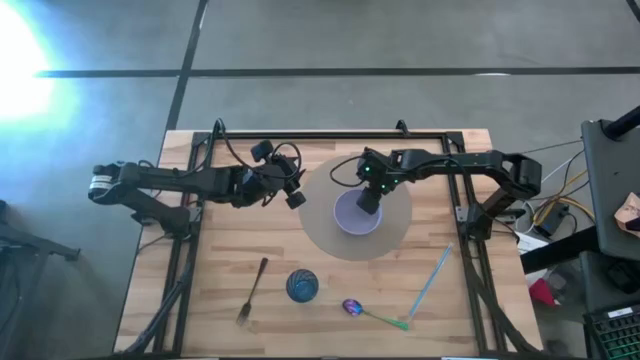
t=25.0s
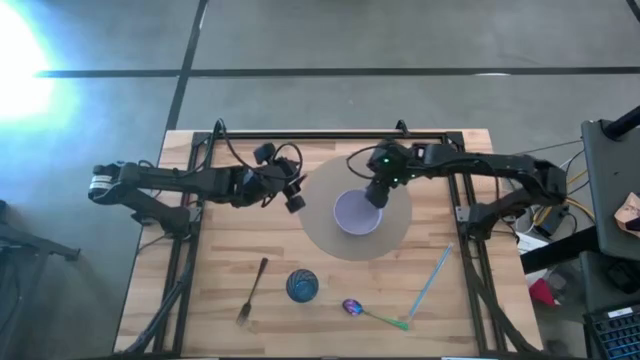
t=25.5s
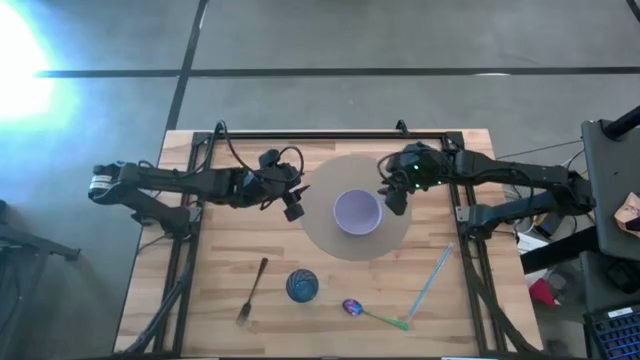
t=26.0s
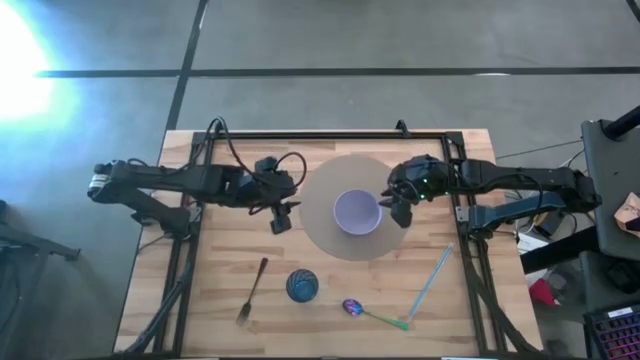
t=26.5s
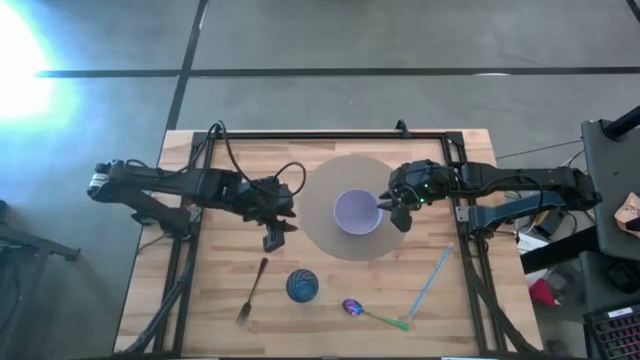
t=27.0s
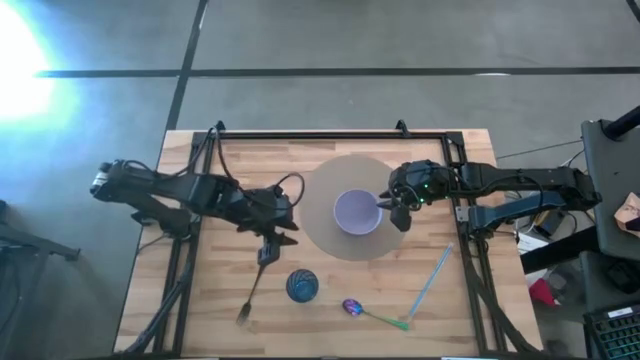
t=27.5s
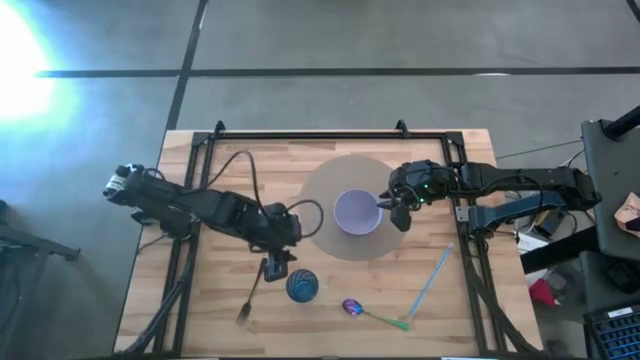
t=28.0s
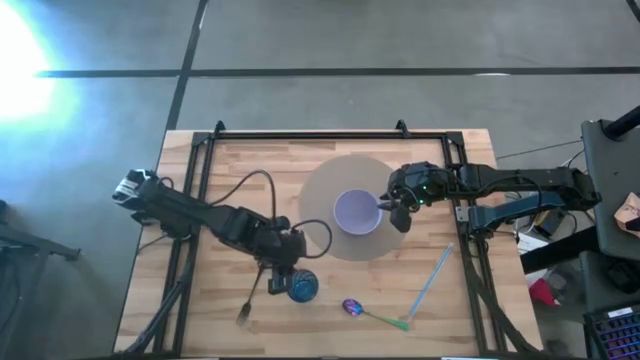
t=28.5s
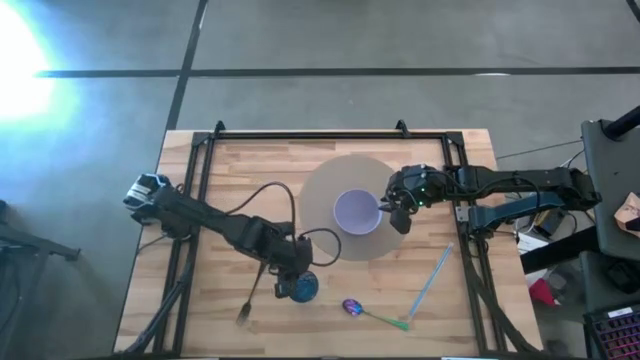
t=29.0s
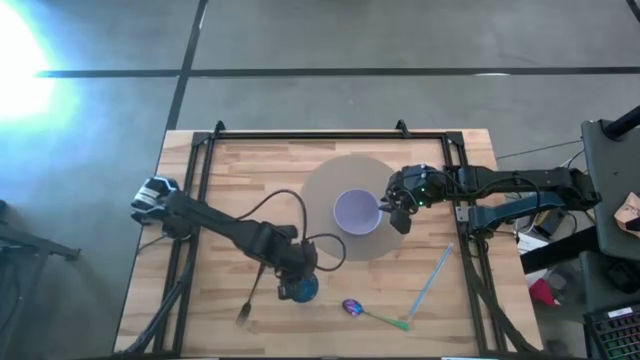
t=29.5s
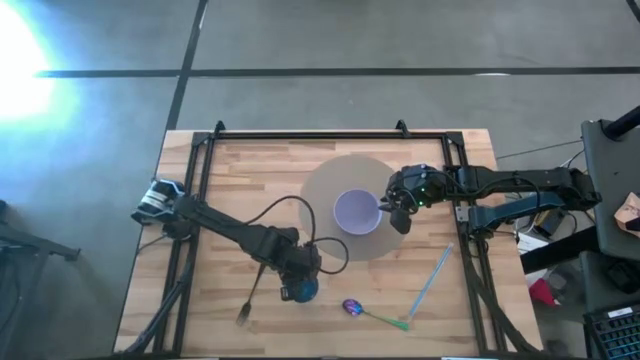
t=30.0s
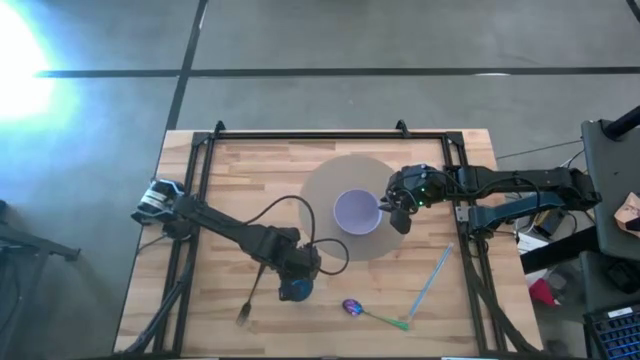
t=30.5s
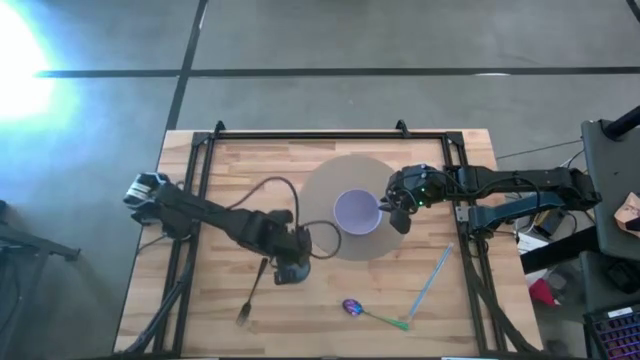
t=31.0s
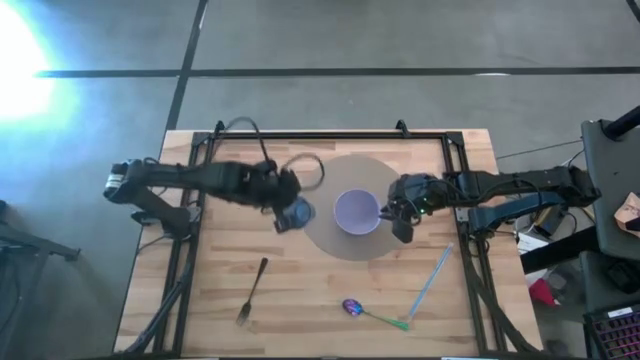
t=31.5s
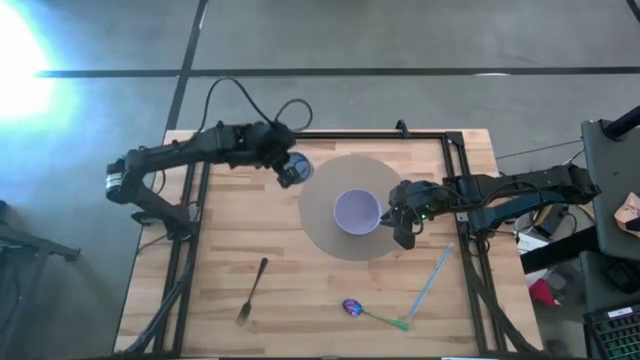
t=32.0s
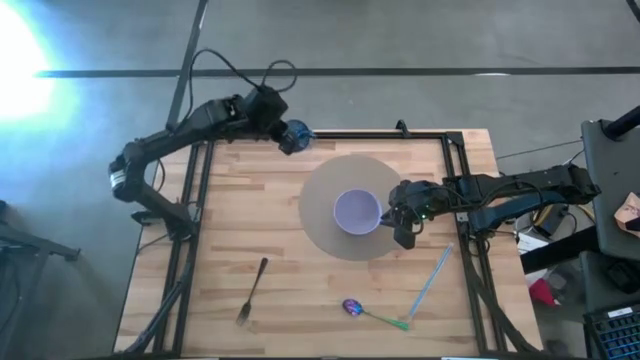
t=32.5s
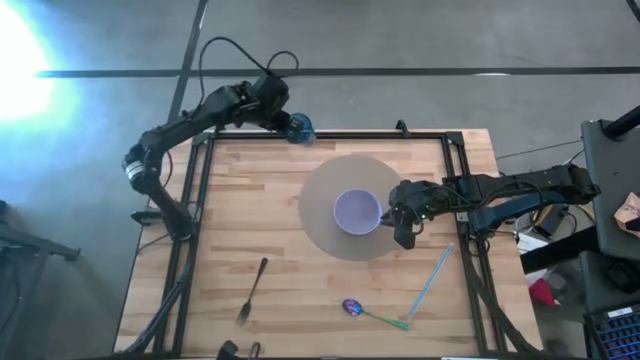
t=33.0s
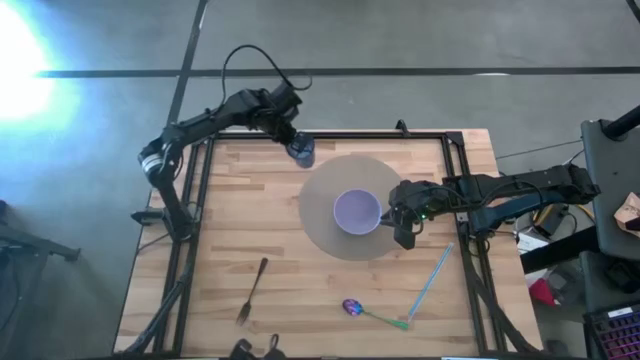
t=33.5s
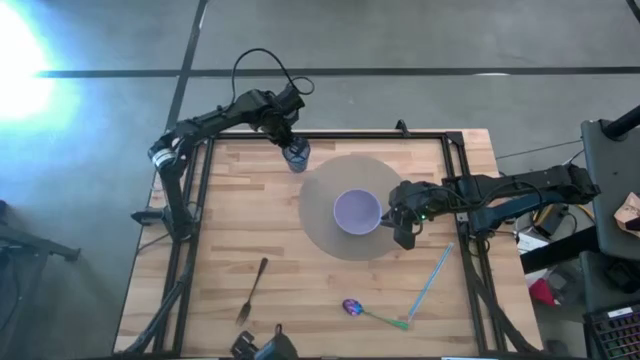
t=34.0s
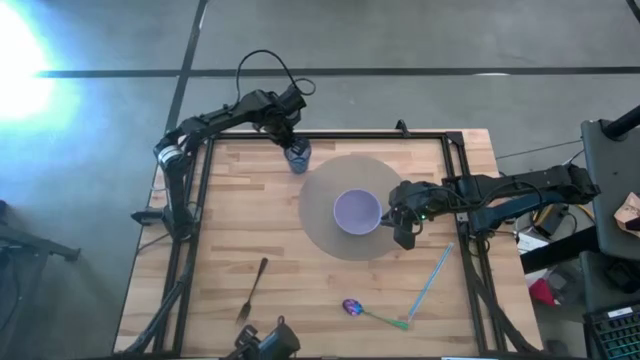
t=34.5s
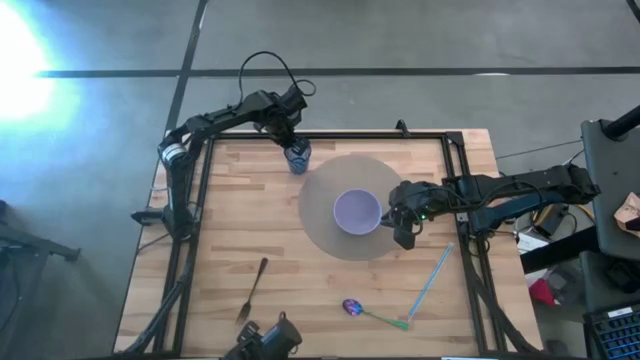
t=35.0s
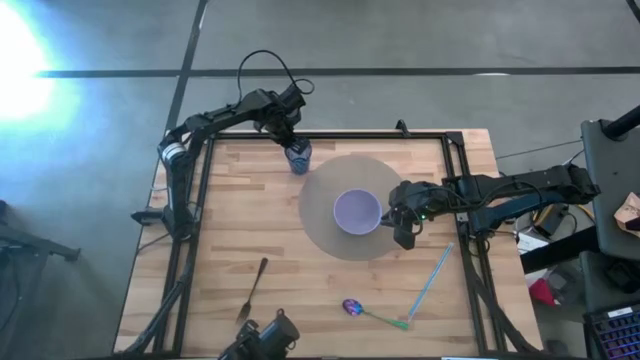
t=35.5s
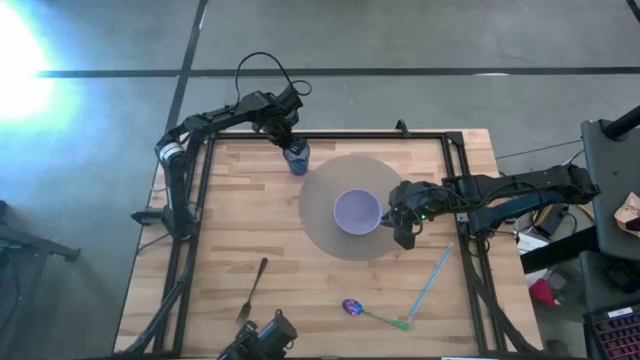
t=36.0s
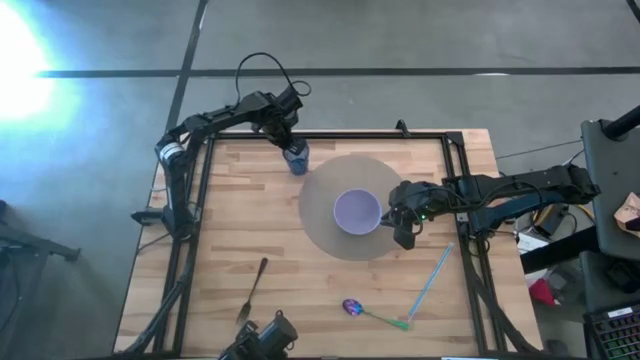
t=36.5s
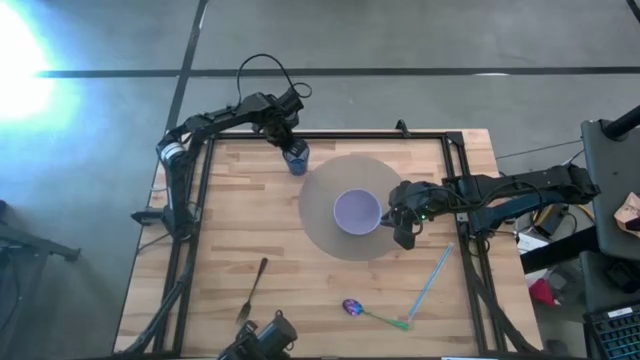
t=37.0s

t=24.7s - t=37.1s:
Task: Pick & Place Utensil
Put the blue cup on the top-left corner of the placemat

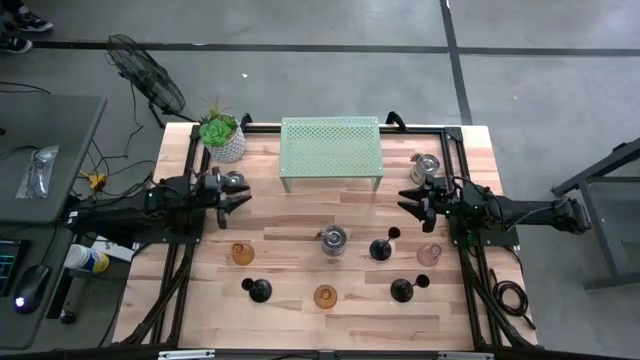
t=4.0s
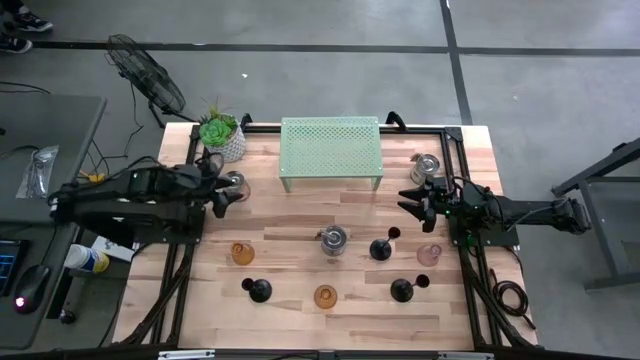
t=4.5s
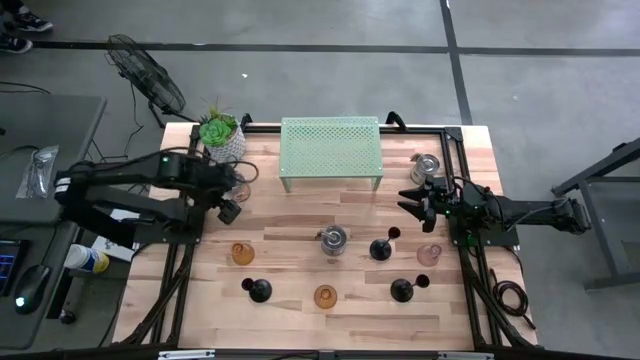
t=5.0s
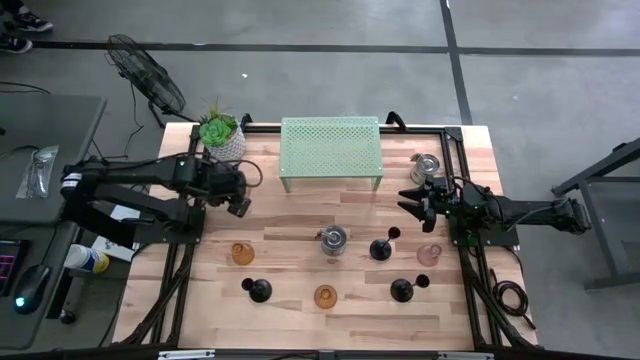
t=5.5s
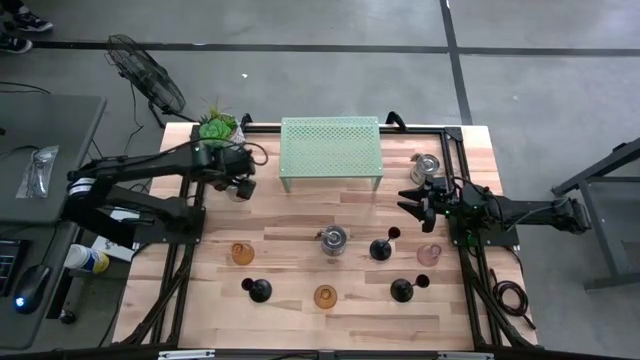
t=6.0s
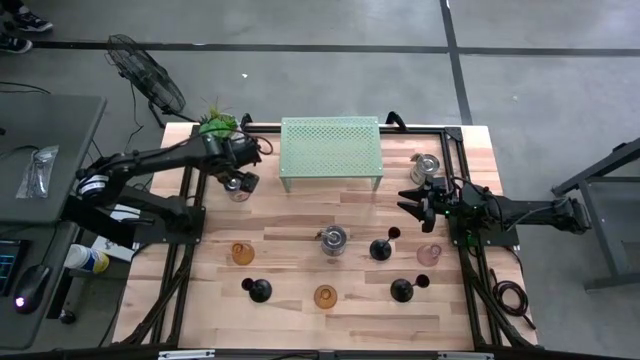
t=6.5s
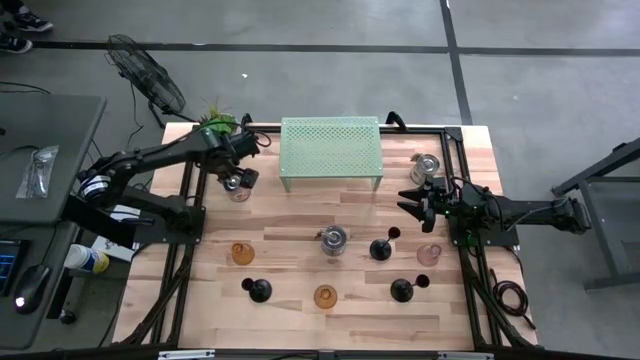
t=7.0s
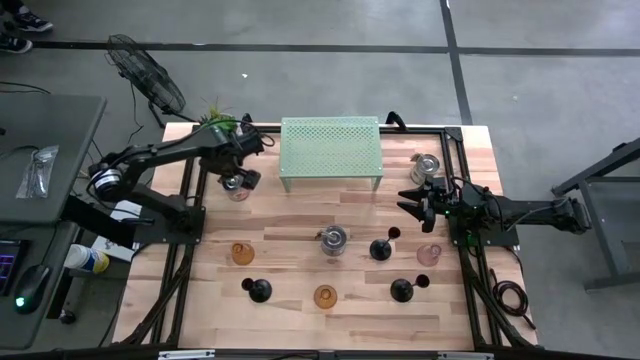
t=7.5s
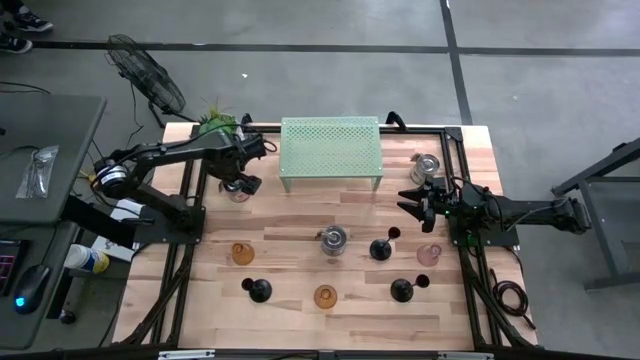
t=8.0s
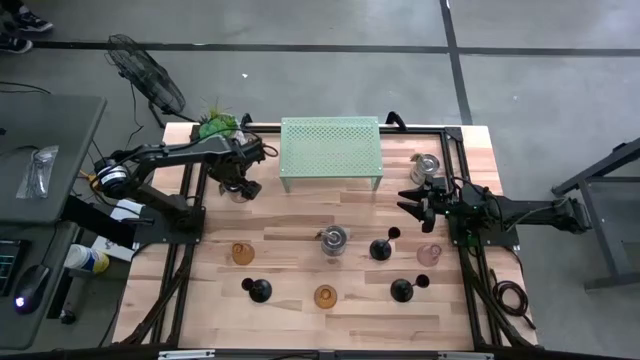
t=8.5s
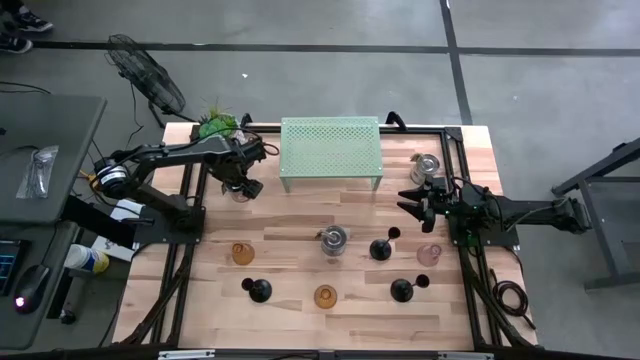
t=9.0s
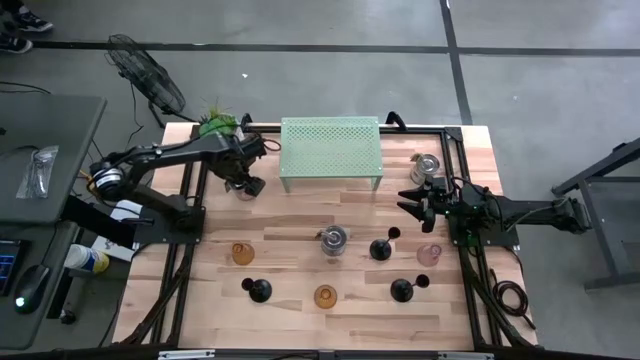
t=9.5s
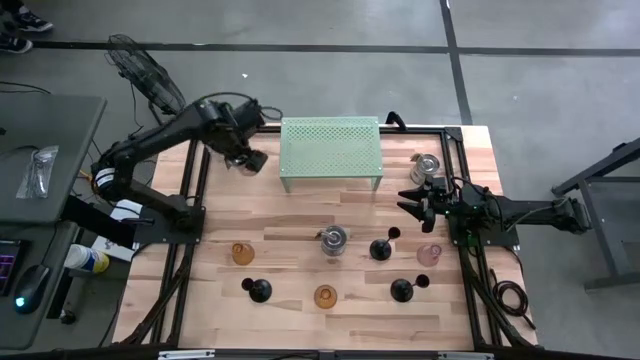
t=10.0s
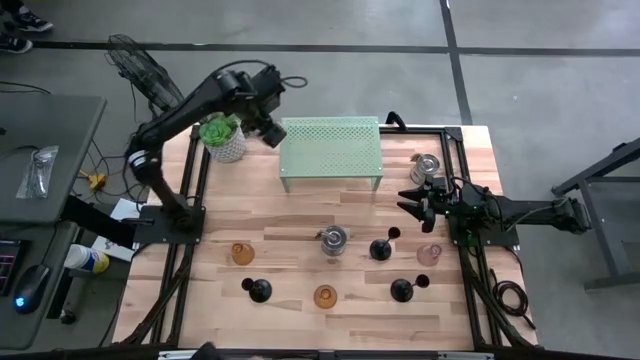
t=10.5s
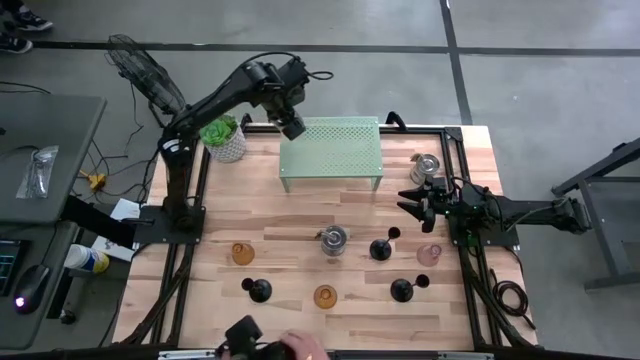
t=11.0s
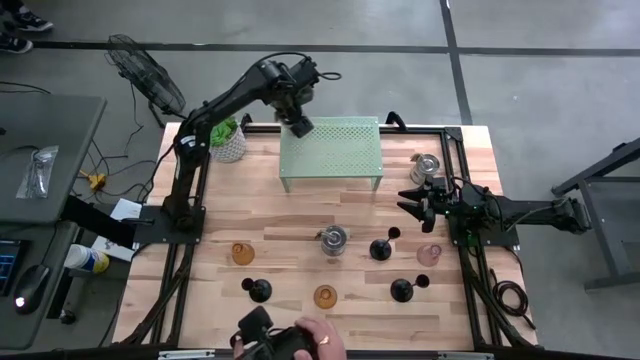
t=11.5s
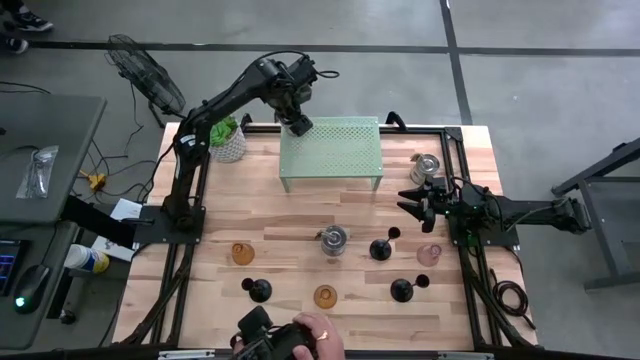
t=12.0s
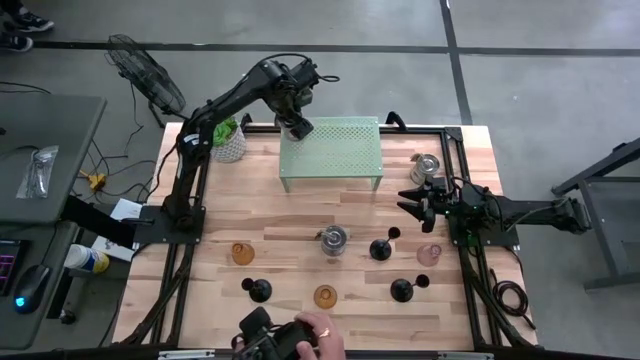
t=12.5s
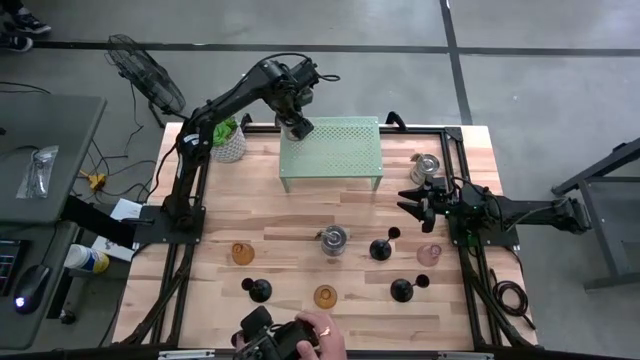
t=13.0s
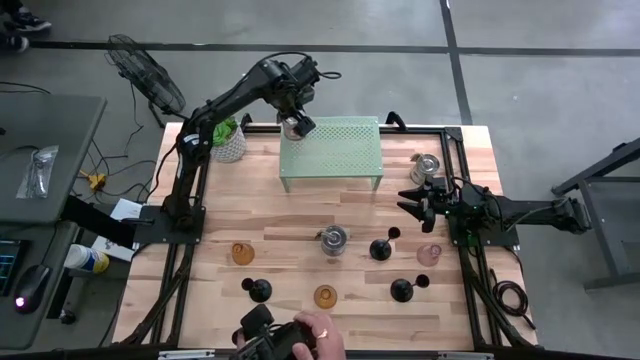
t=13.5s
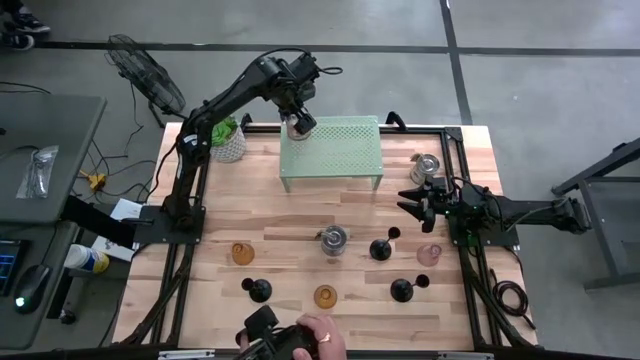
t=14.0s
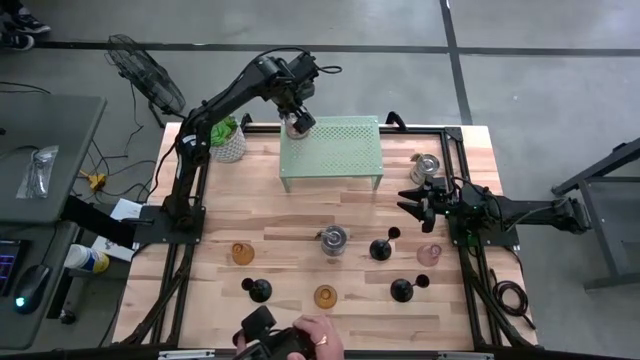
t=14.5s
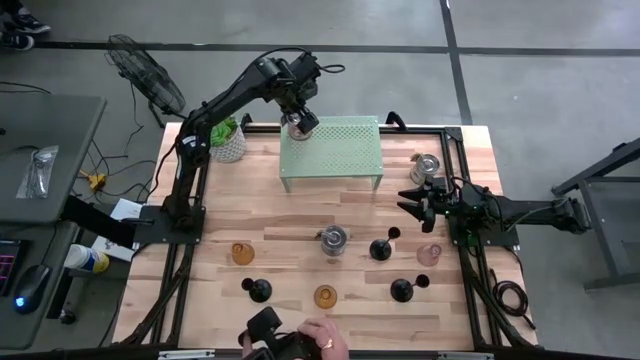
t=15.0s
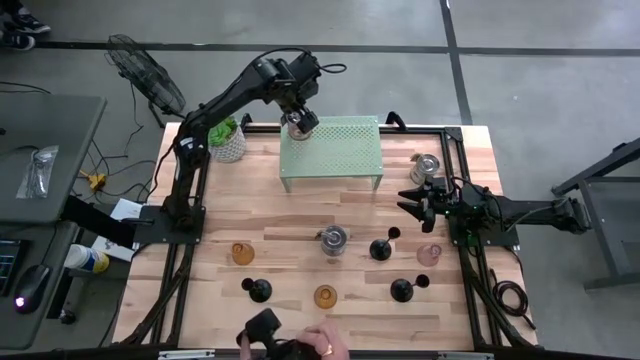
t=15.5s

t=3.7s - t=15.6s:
Task: Pick & Place candle stick holders
Put the left silver scented candle on the shelf
